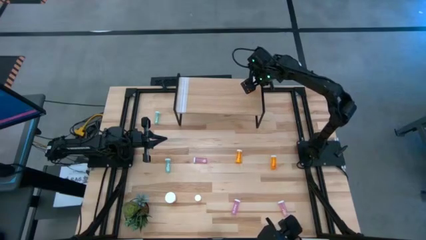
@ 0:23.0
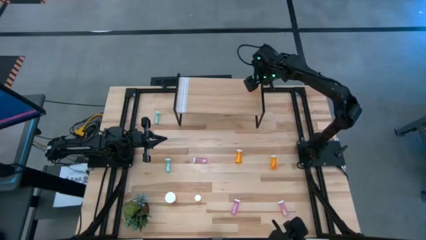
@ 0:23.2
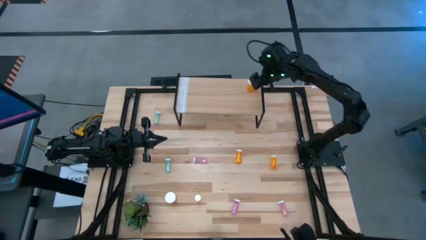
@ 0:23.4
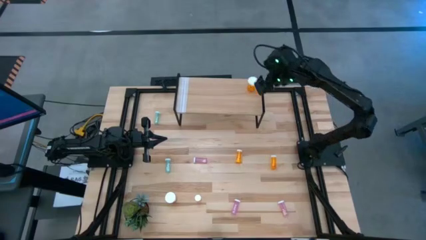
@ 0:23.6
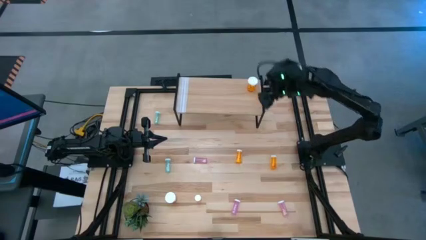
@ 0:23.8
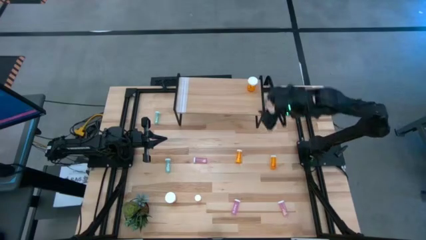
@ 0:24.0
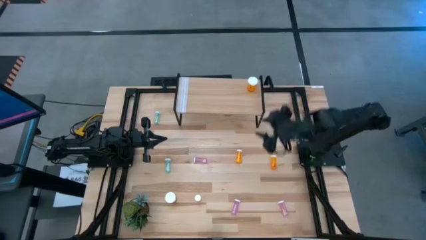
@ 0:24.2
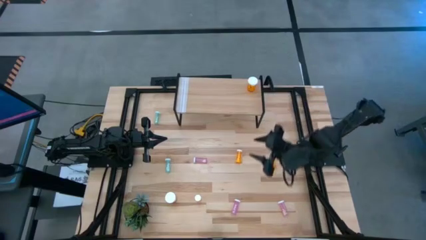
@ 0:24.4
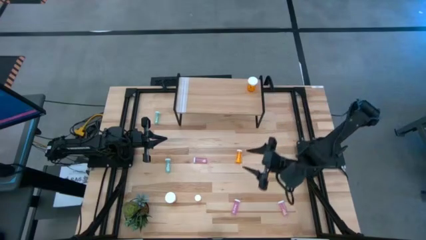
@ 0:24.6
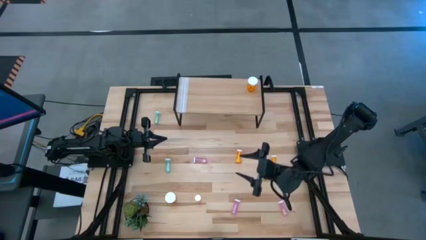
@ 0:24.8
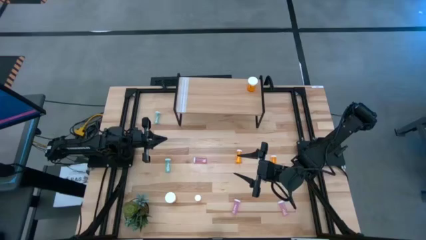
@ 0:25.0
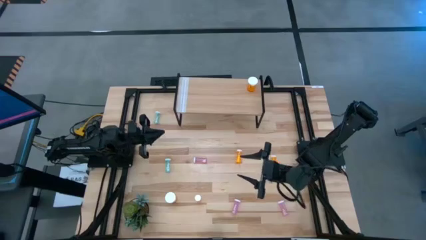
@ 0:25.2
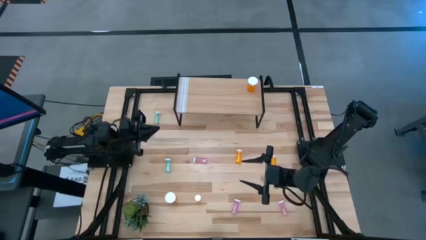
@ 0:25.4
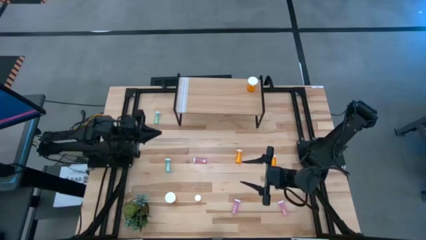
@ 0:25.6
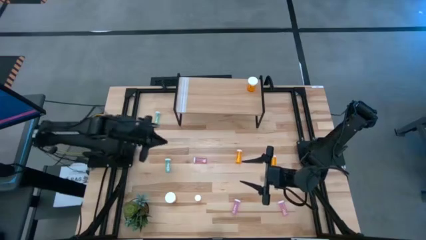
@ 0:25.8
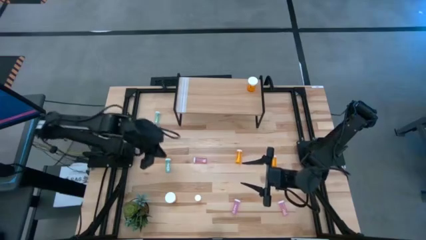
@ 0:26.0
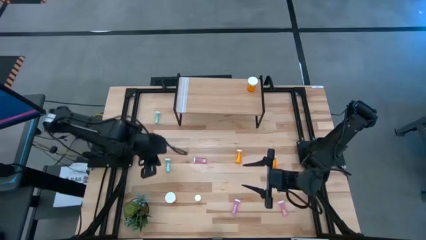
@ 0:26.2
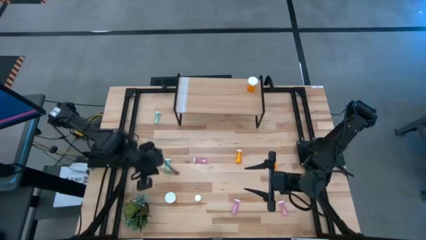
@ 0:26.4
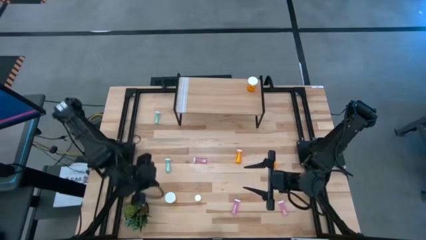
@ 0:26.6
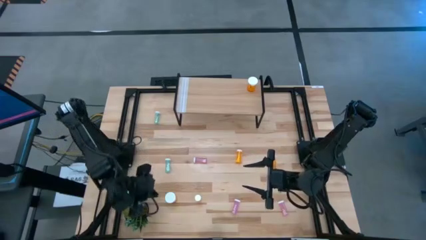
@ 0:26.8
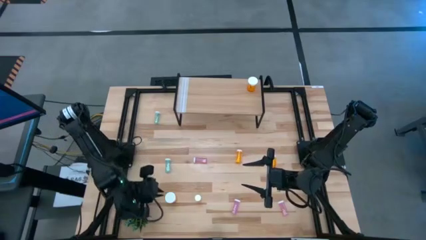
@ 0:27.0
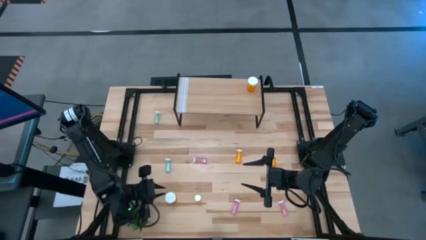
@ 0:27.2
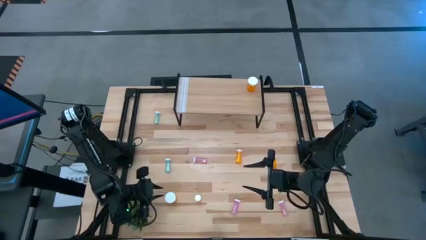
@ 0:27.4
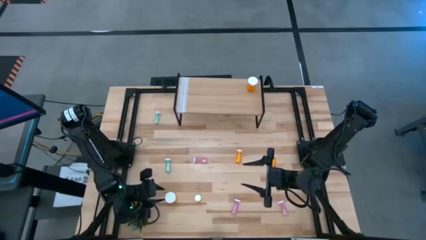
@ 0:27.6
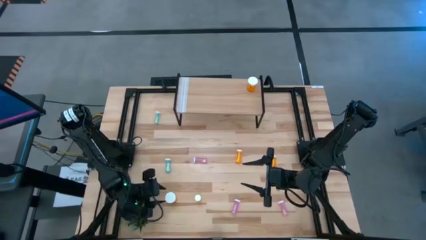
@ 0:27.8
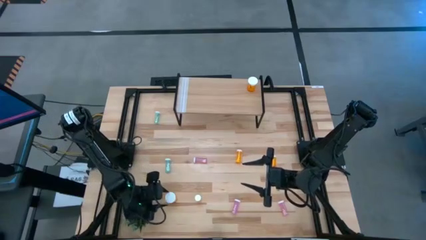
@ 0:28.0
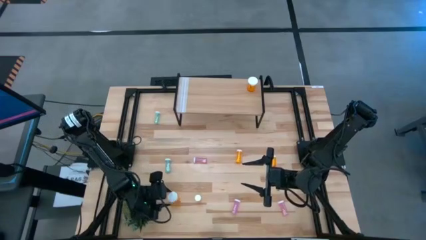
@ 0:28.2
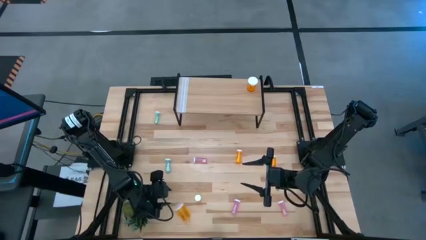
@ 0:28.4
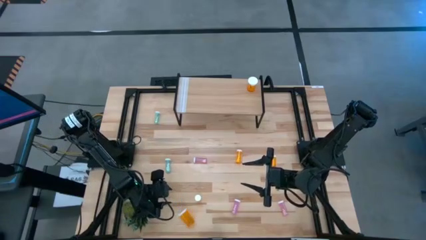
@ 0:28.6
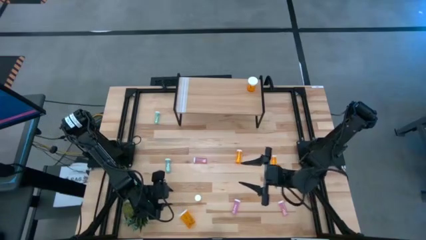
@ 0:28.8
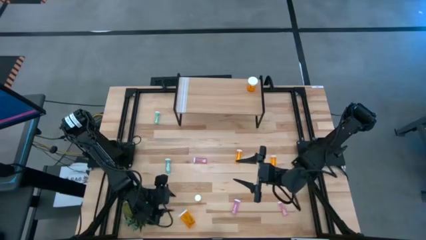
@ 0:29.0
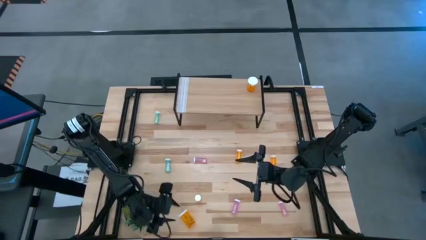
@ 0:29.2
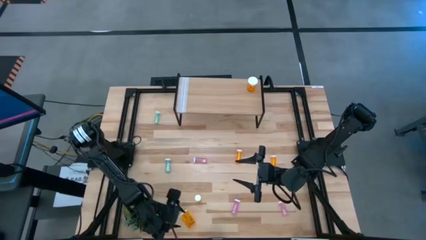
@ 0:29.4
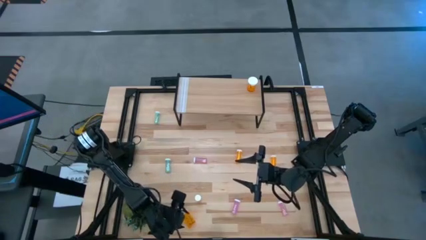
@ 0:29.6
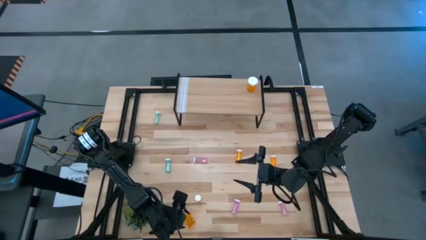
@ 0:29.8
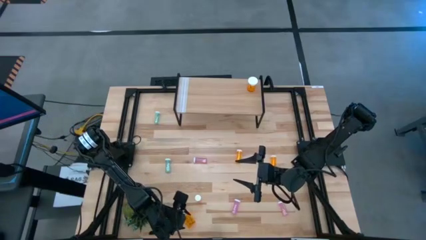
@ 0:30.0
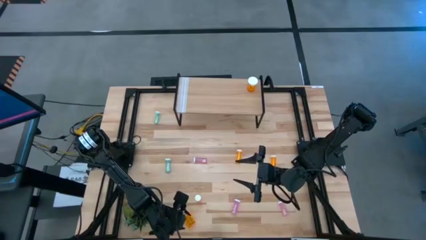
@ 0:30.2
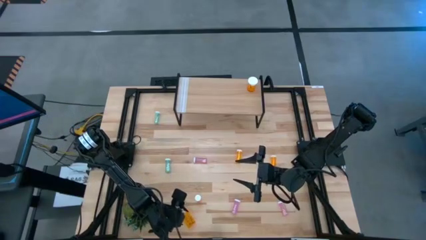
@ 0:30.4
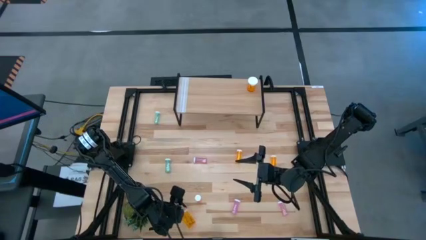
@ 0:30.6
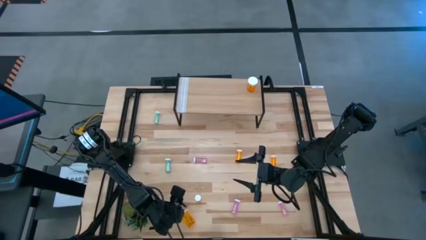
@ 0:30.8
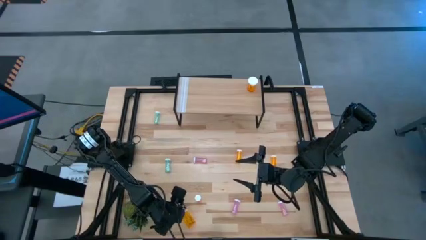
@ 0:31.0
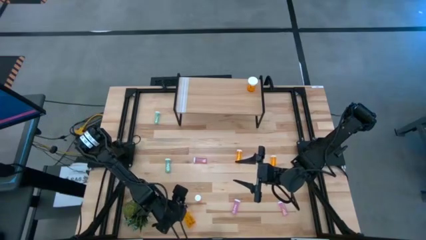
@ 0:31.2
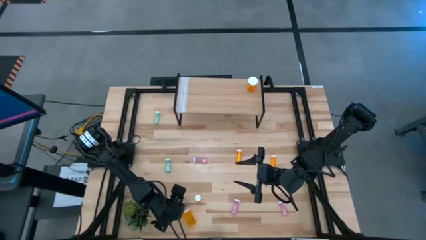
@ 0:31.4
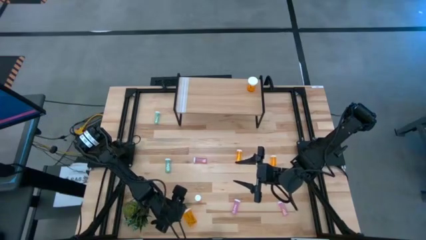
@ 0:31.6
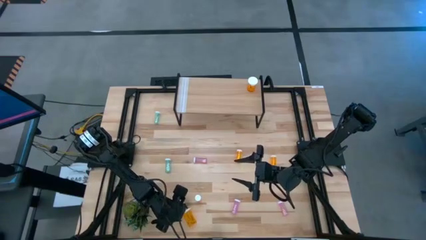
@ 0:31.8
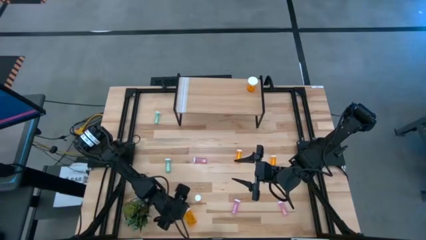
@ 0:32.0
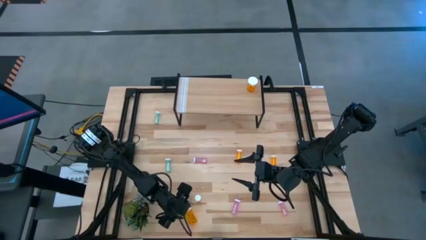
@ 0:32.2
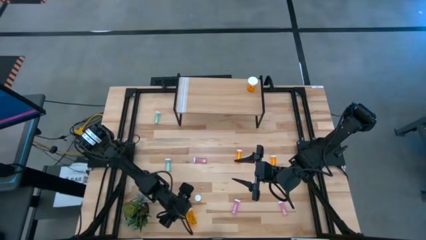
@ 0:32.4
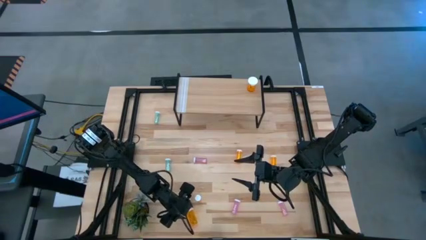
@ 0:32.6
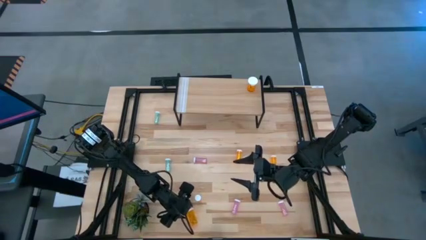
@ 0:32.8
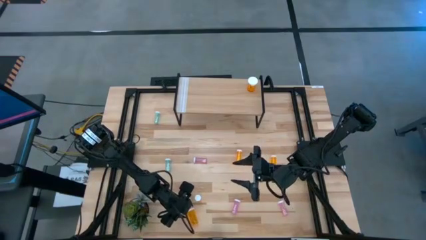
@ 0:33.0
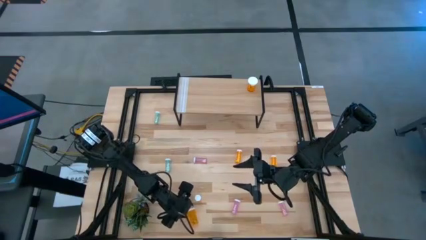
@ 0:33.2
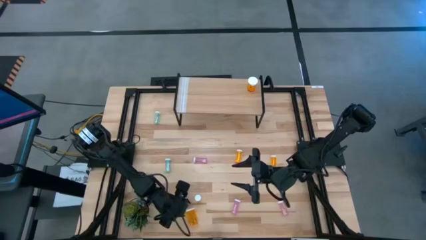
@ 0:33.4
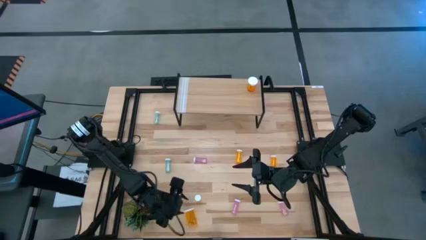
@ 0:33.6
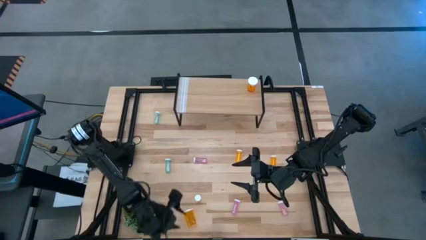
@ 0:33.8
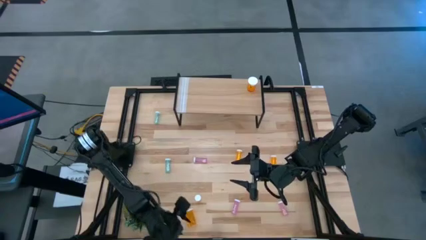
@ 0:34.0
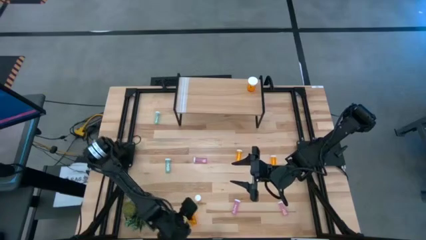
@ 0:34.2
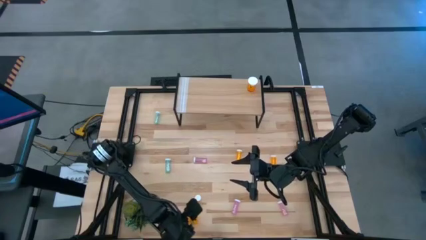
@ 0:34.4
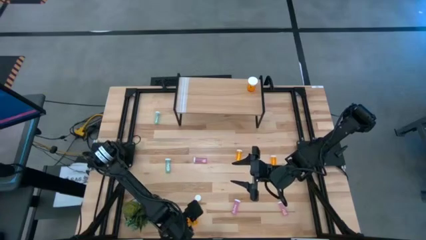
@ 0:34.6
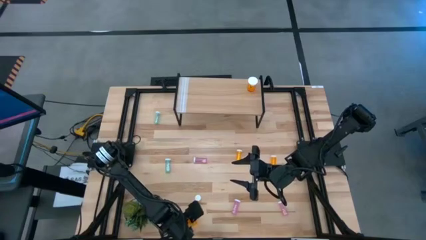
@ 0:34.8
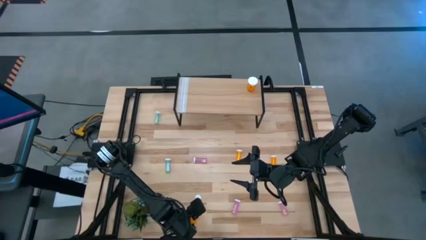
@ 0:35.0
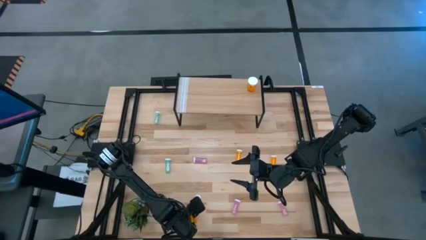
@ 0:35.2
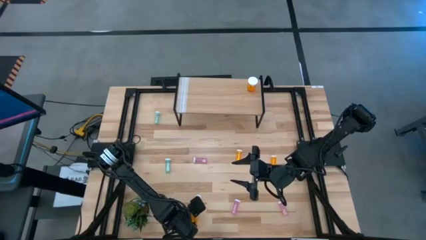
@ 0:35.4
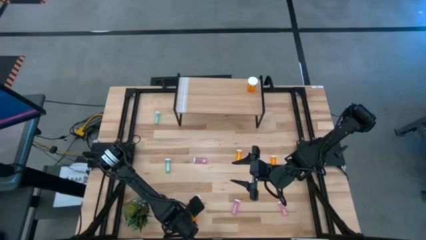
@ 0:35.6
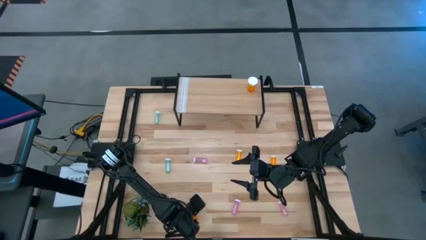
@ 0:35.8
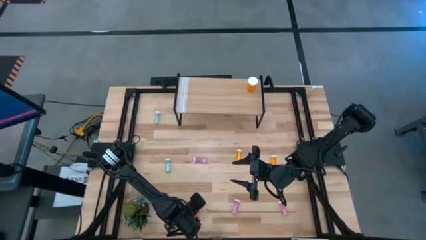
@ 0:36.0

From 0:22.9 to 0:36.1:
Task: Pick and place medicine bottles onto shelf by color
Put the large orange pill bottle on the shelf aligned with the other large orange pill bottle
